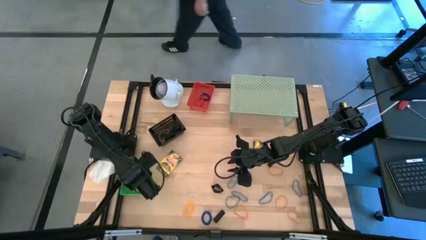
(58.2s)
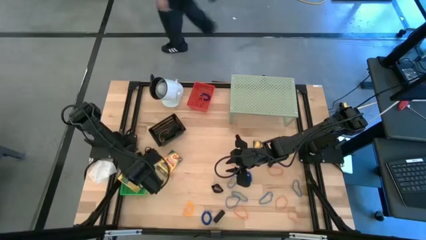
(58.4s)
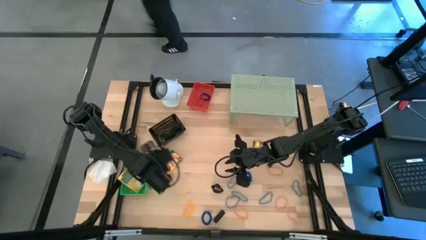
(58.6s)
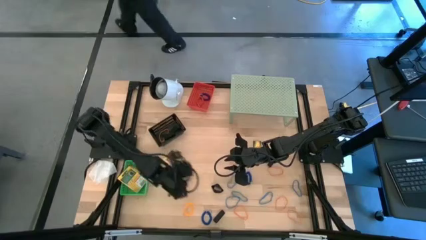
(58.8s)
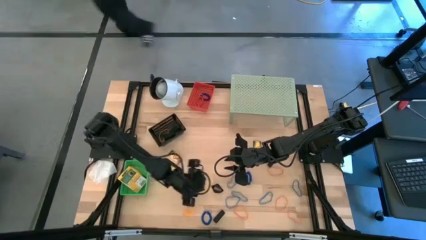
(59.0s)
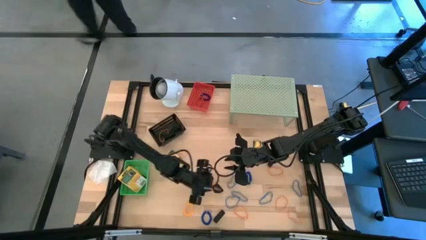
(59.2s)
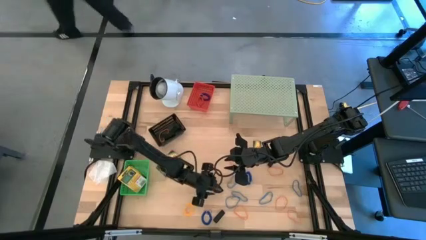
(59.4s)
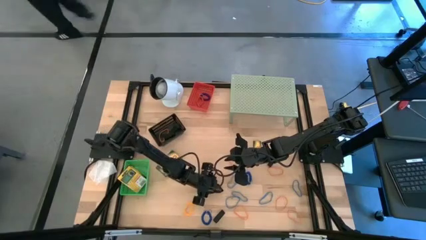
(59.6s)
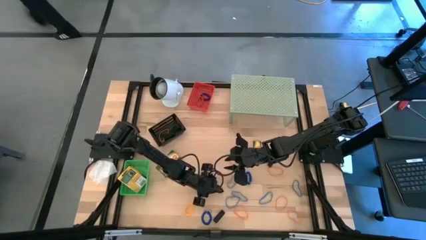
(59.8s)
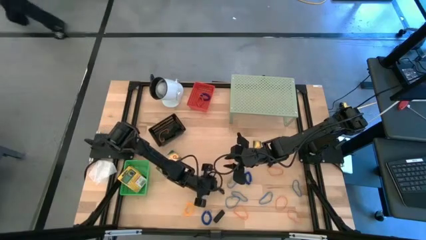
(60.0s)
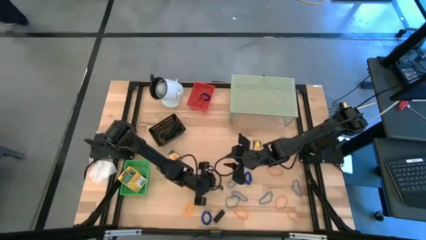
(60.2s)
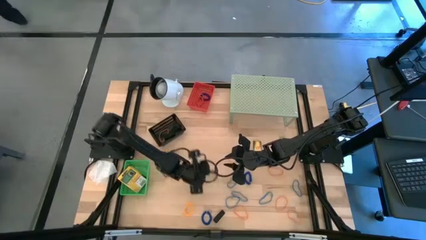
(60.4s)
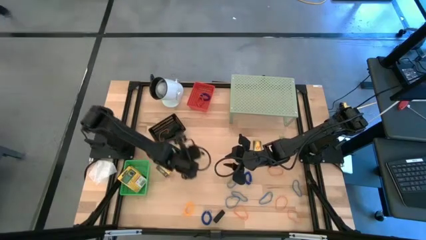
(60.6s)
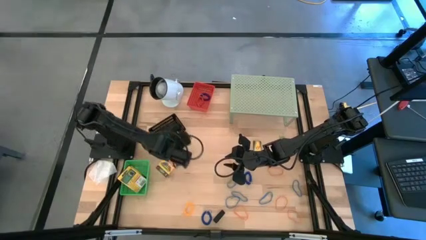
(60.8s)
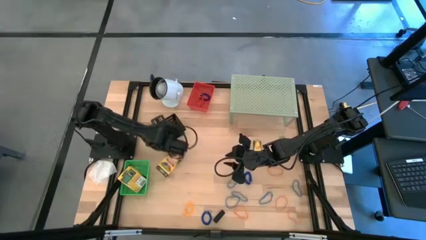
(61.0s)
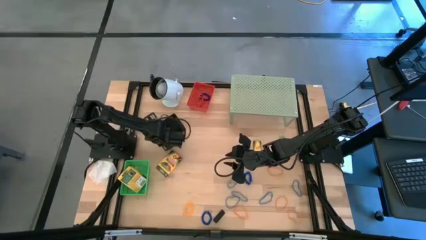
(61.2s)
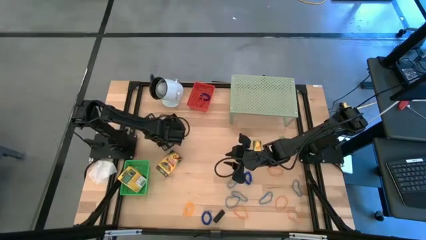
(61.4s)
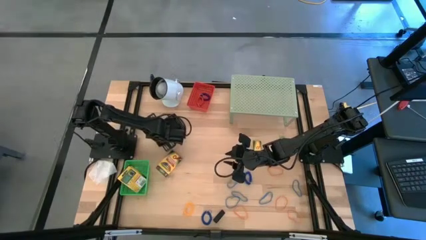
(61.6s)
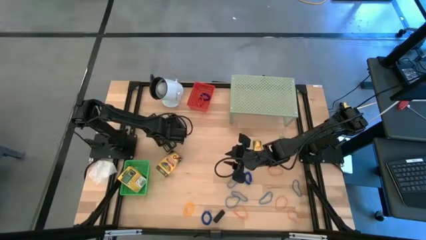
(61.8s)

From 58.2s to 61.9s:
Task: Pick & Place Office Desk Supplies
Put the black rubber band into the black bin

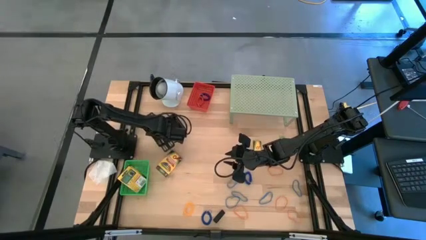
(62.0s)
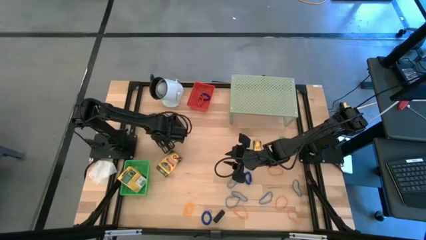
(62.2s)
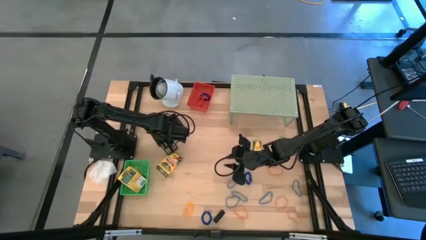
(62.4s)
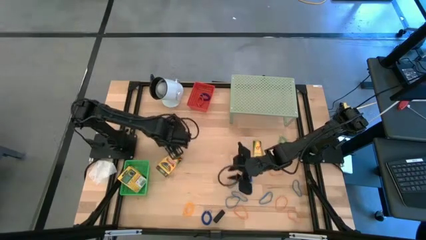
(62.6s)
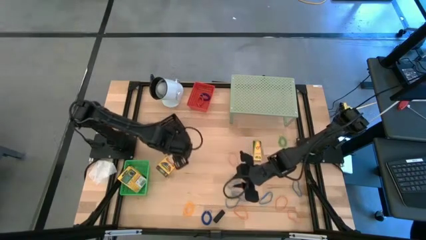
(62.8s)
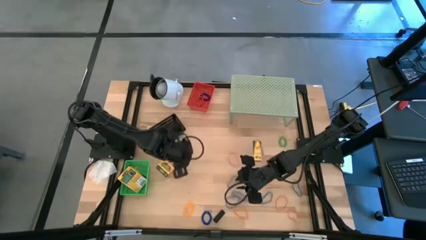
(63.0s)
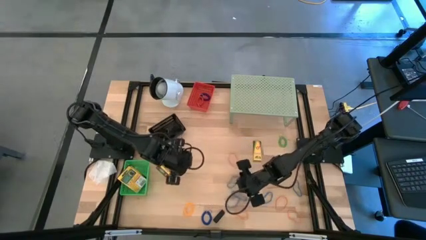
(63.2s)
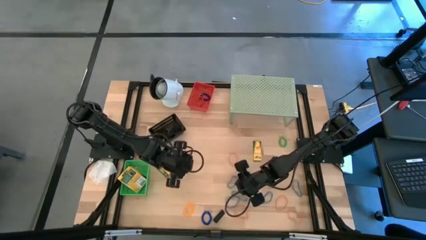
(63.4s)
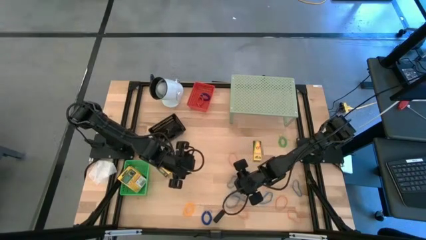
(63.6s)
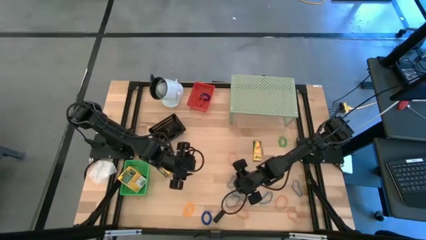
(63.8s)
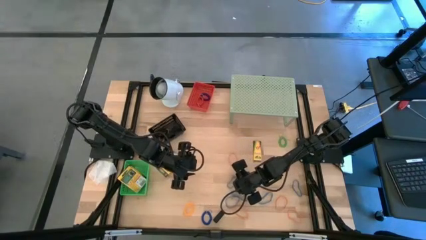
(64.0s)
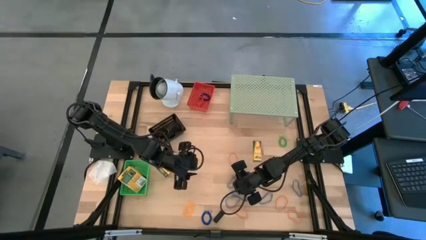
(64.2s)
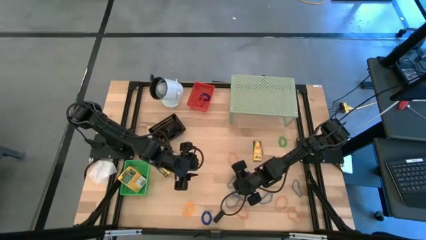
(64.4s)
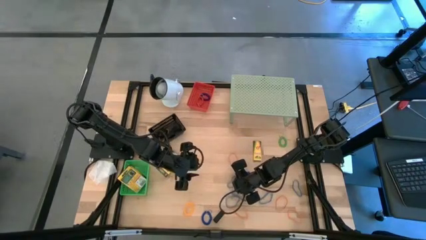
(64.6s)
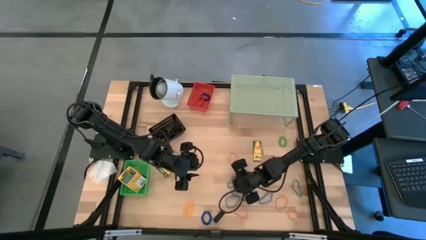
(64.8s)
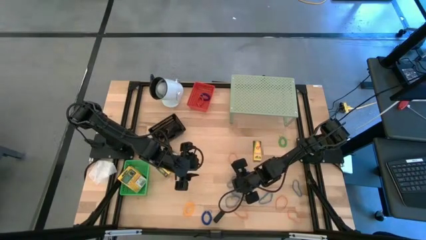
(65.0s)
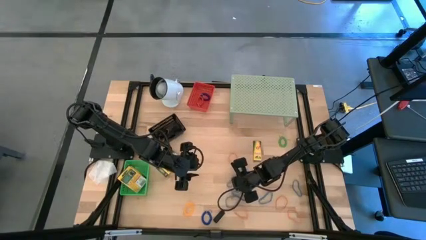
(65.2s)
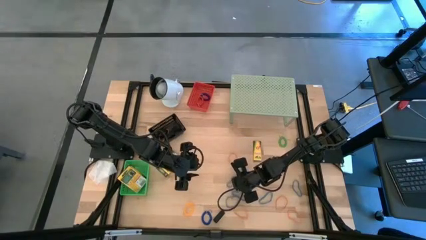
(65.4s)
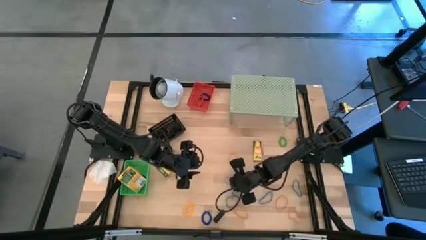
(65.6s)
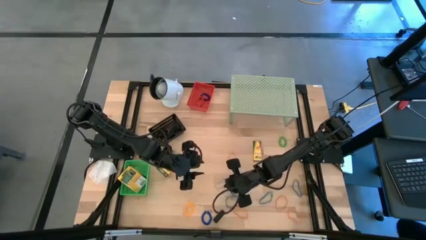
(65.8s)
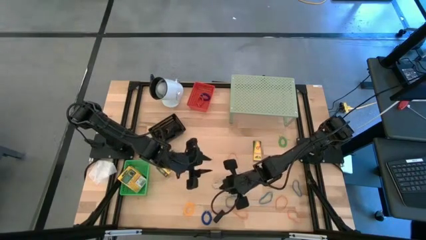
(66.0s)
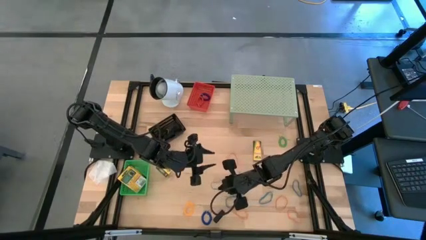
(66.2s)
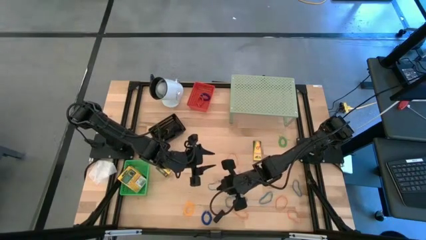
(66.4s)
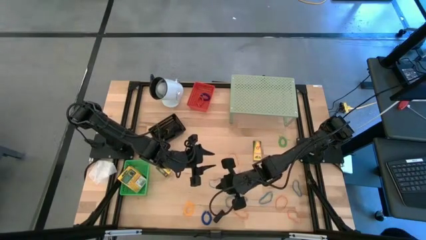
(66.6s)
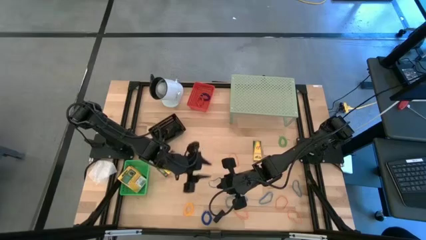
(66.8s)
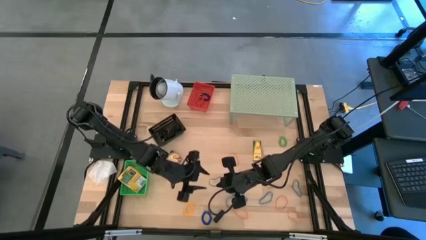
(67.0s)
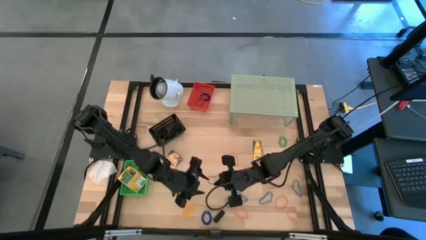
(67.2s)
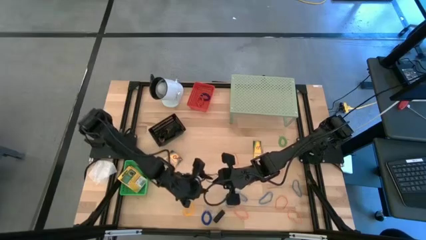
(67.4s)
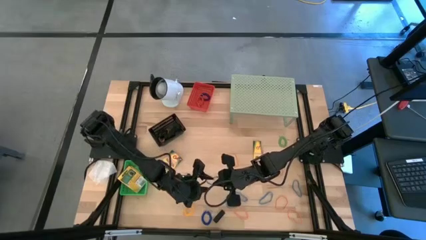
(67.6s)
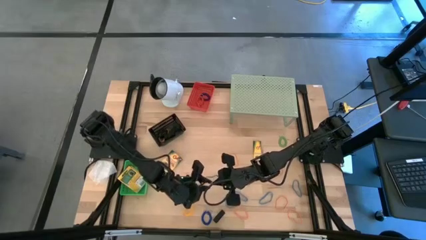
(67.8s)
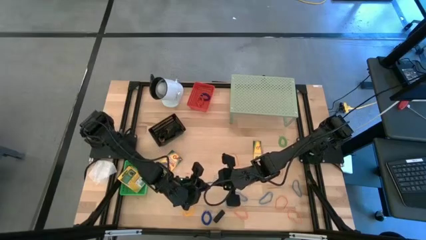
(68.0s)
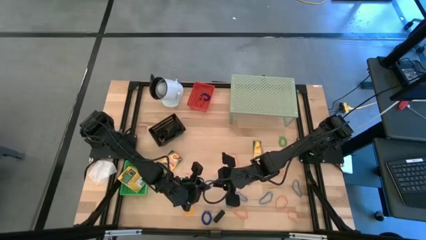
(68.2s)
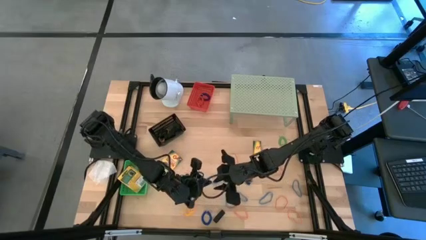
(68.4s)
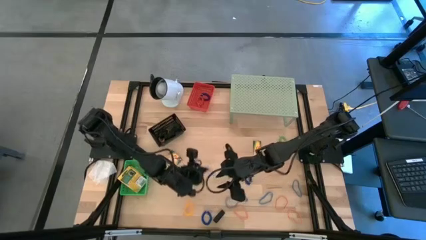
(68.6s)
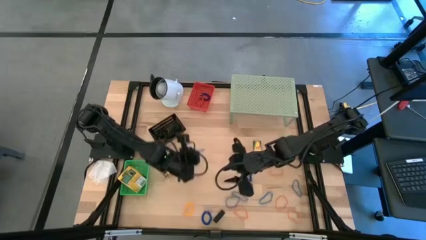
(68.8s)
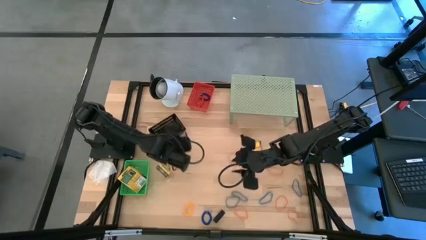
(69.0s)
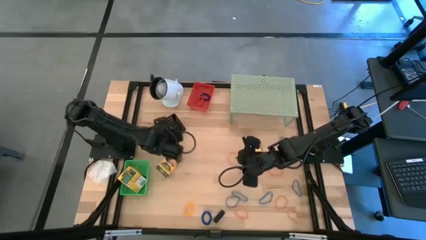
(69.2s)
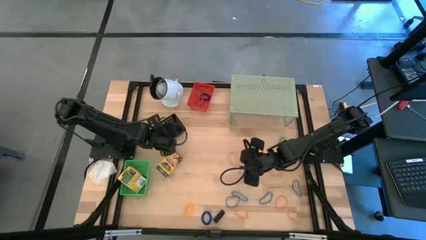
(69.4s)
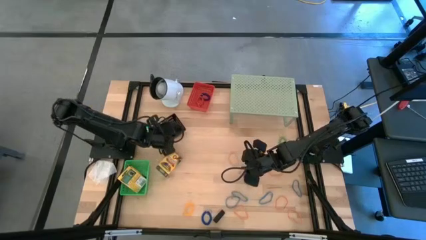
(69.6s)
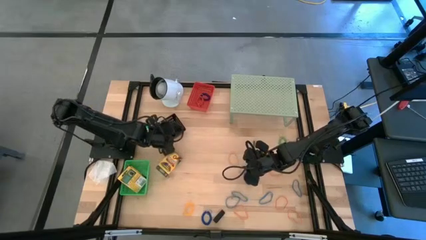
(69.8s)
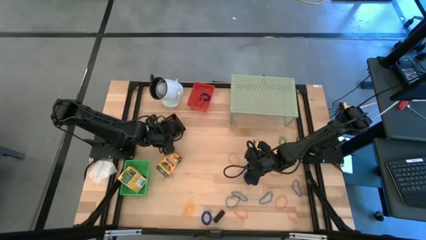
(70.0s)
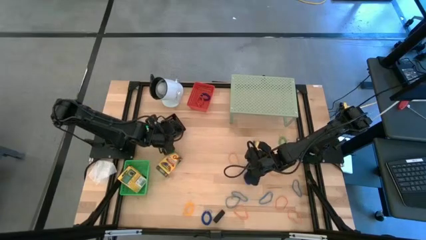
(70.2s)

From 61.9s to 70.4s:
Put the blue rubber band into the black bin

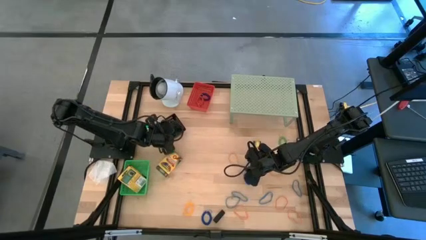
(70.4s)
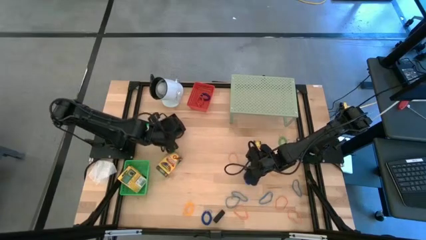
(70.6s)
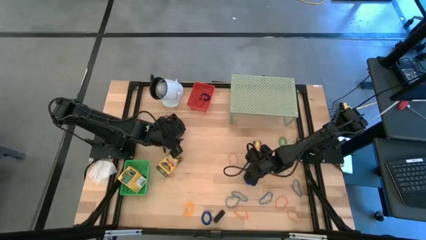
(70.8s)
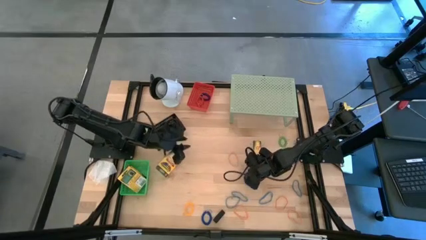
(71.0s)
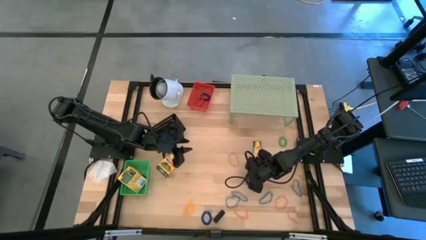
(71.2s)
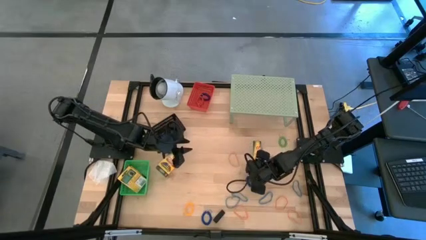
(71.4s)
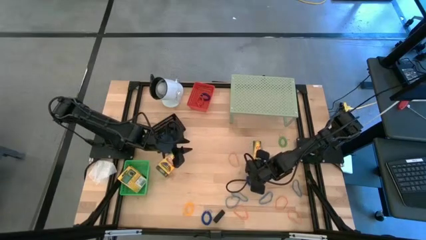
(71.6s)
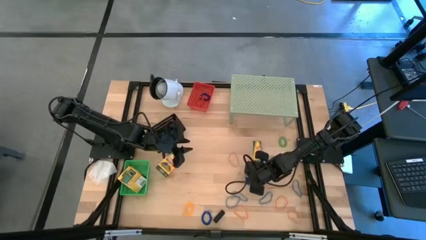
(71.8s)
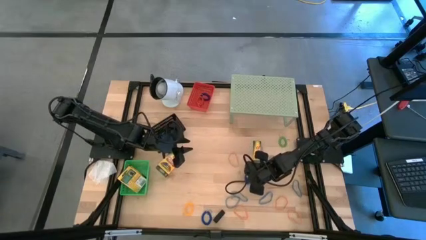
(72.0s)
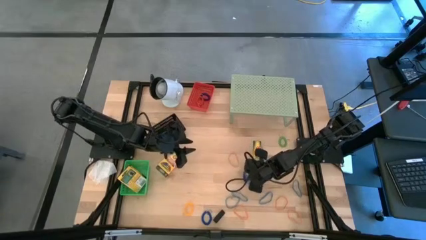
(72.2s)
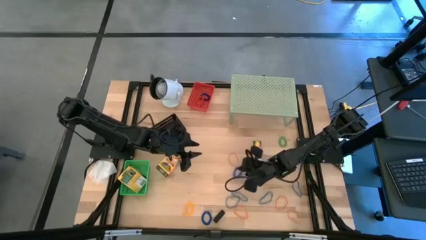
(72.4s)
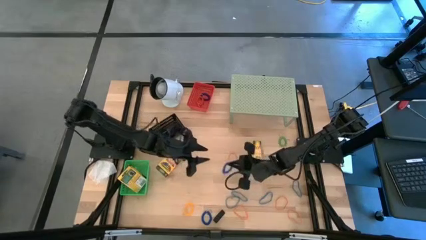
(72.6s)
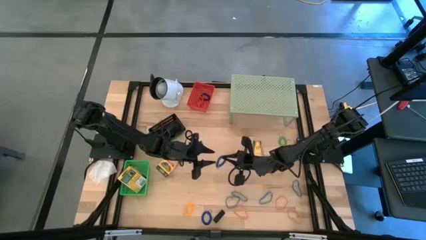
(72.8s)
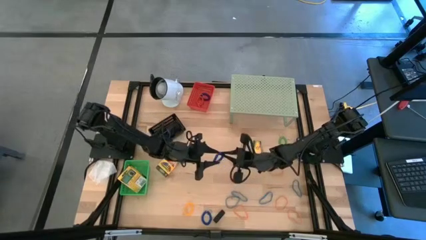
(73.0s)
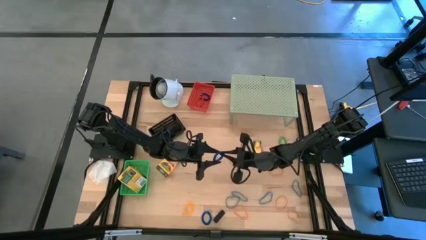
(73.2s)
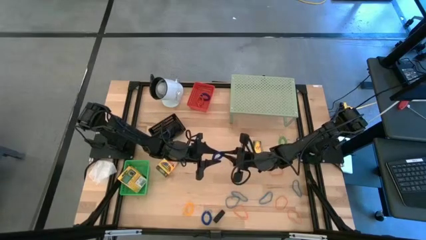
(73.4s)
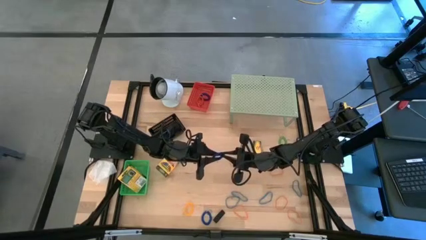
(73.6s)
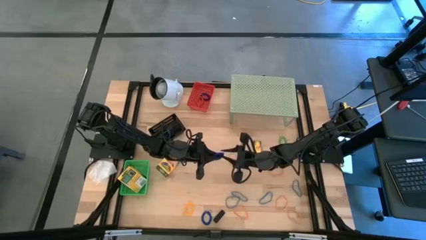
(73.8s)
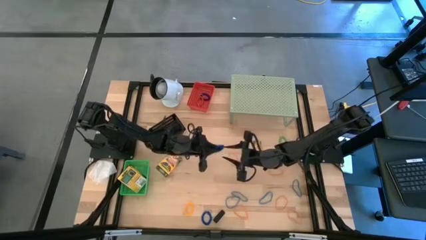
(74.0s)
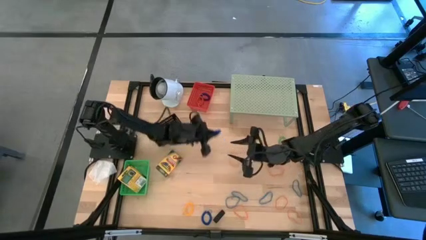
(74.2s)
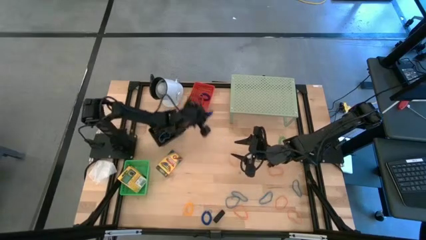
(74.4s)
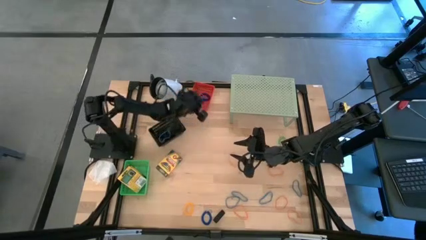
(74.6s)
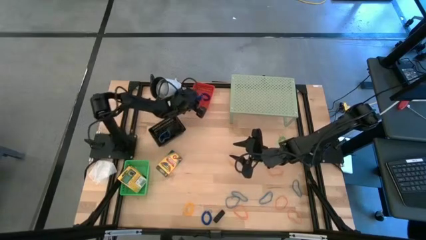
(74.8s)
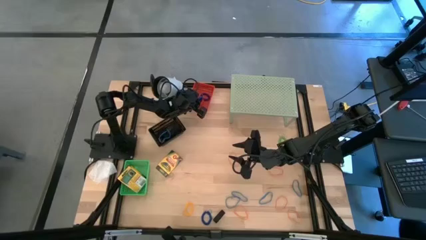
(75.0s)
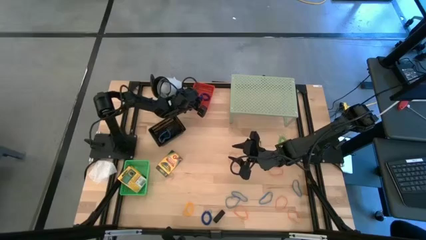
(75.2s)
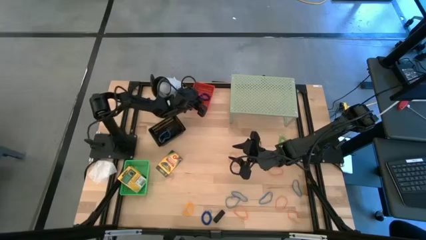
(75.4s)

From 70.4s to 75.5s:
Put the blue keychain into the red bin
